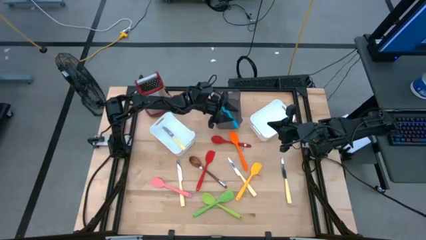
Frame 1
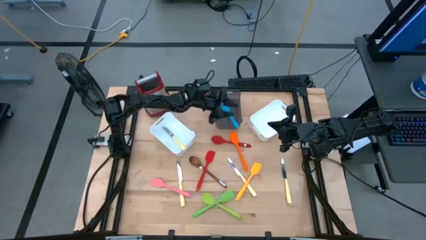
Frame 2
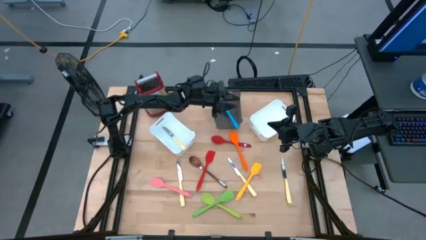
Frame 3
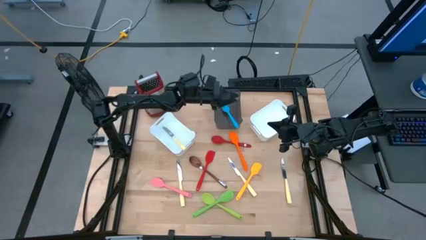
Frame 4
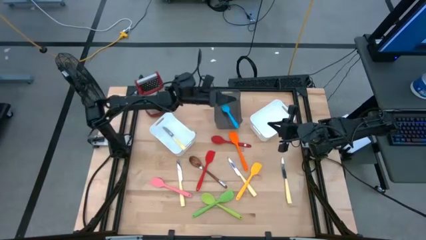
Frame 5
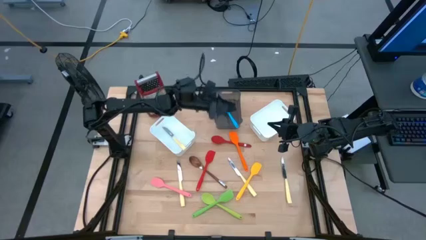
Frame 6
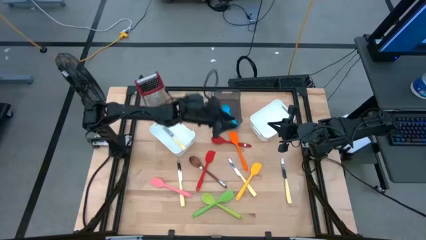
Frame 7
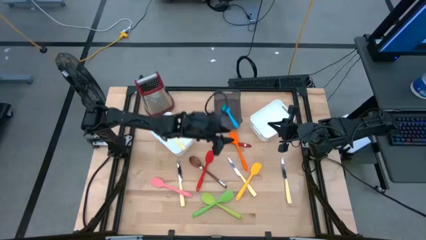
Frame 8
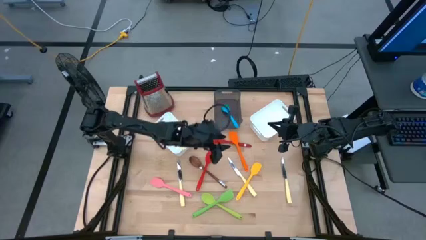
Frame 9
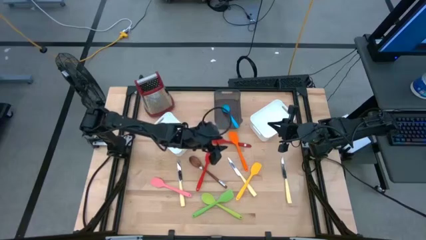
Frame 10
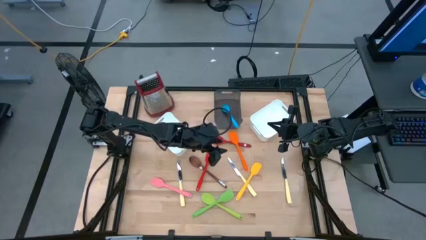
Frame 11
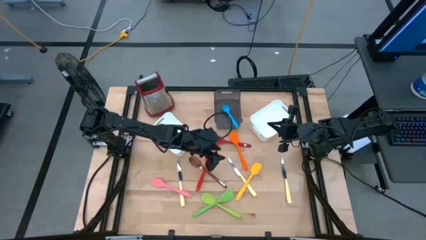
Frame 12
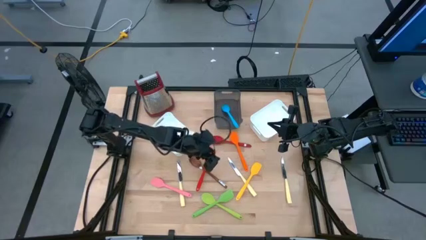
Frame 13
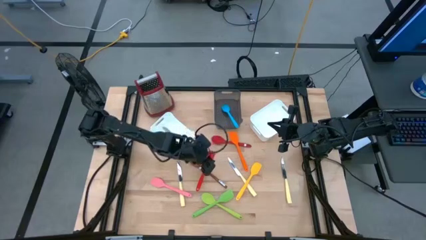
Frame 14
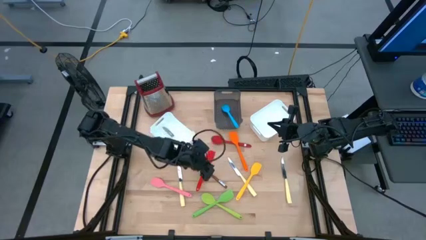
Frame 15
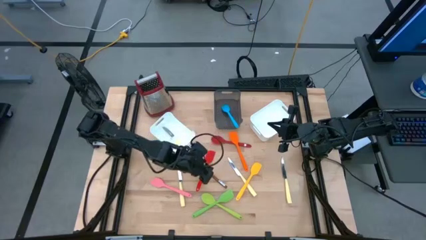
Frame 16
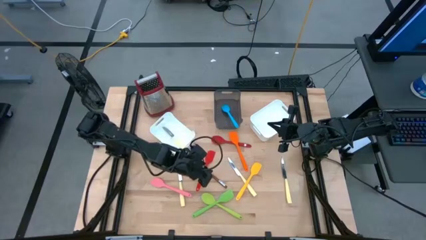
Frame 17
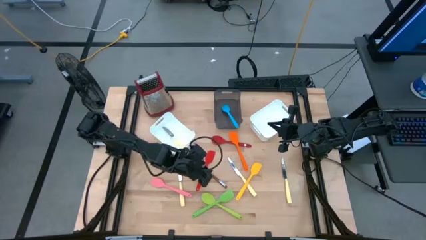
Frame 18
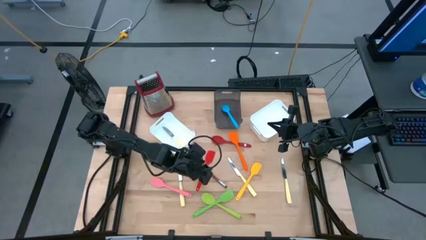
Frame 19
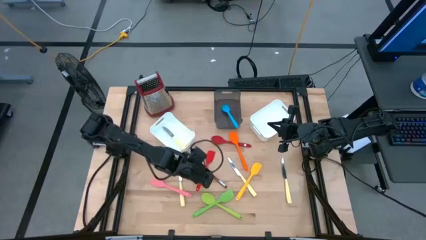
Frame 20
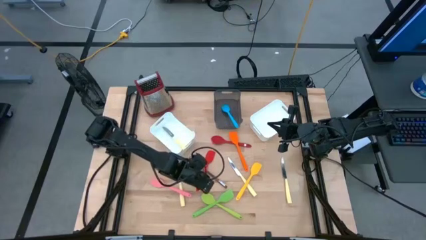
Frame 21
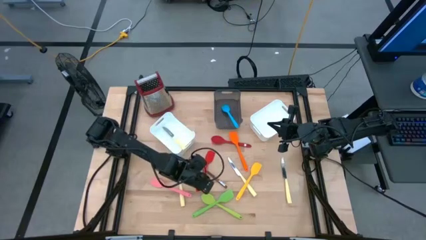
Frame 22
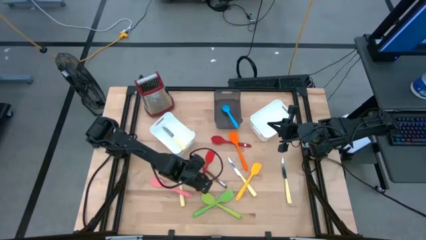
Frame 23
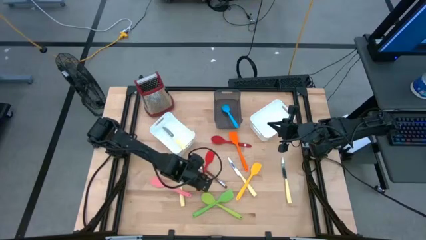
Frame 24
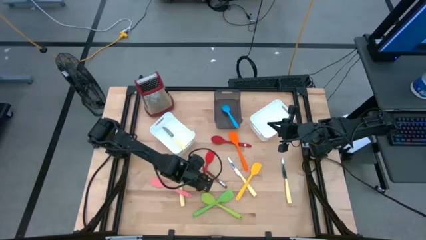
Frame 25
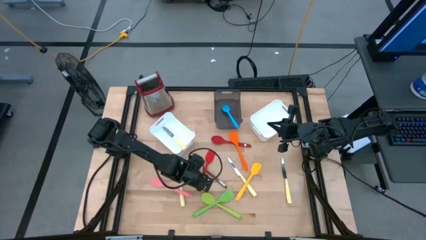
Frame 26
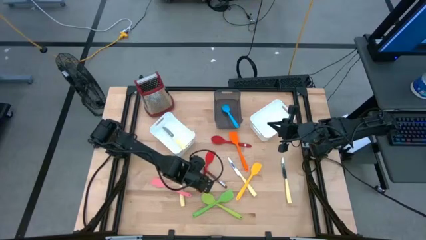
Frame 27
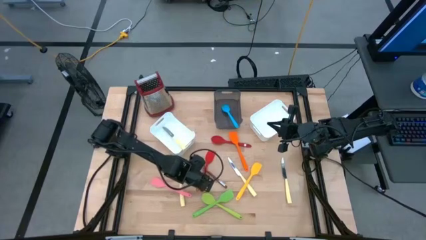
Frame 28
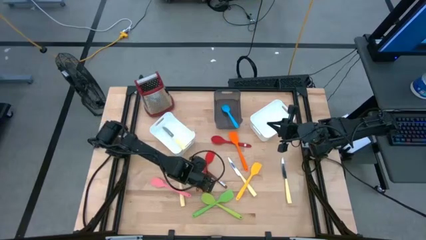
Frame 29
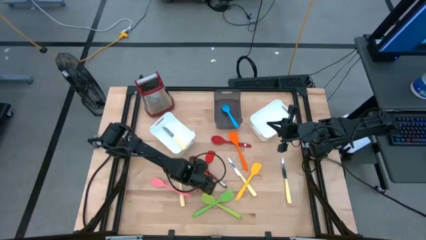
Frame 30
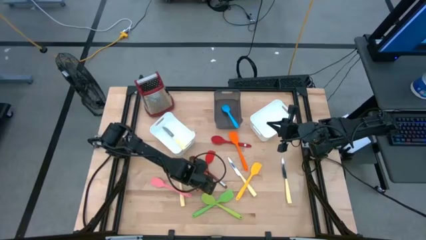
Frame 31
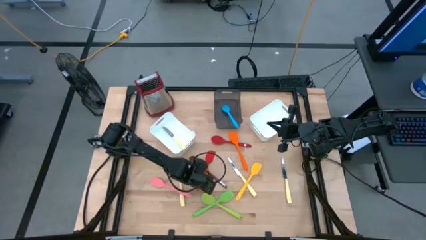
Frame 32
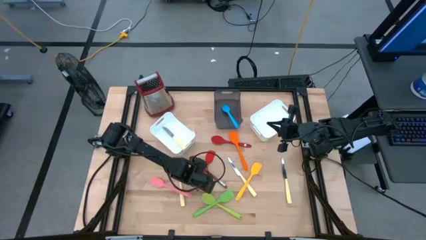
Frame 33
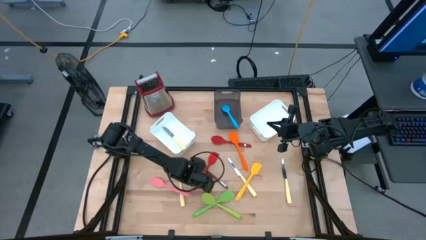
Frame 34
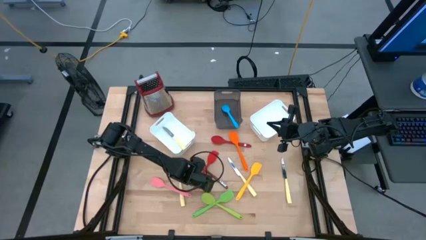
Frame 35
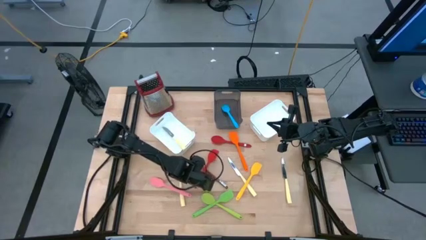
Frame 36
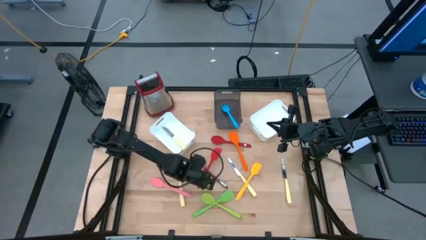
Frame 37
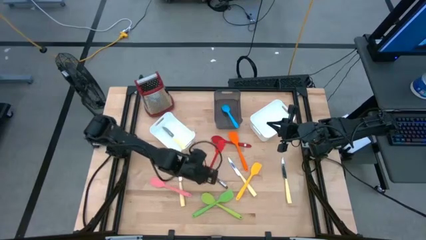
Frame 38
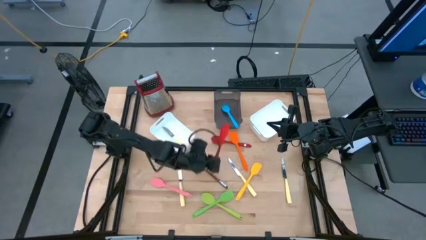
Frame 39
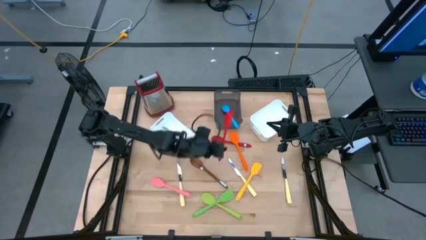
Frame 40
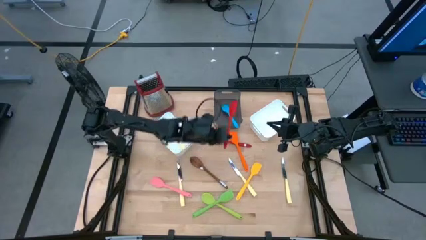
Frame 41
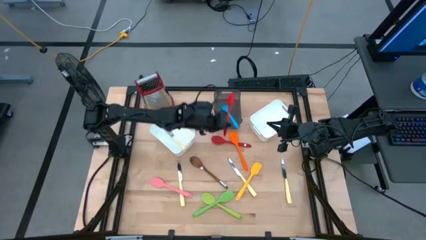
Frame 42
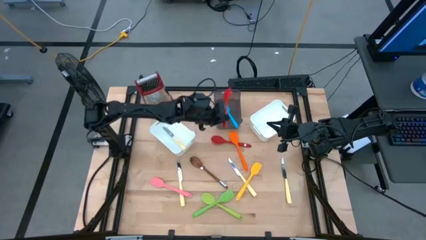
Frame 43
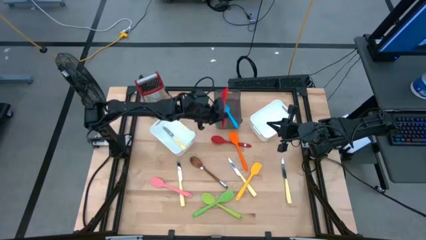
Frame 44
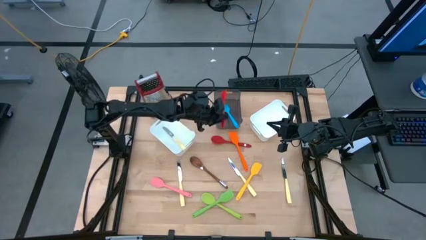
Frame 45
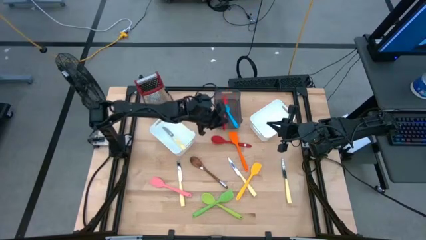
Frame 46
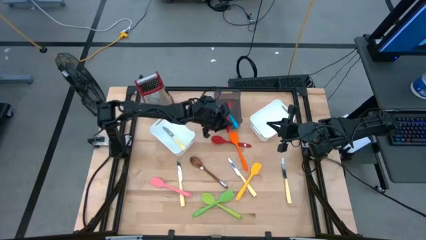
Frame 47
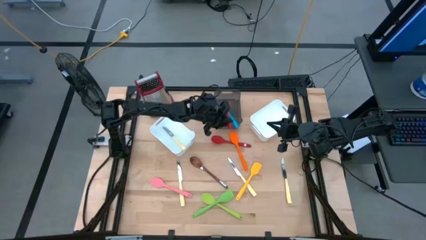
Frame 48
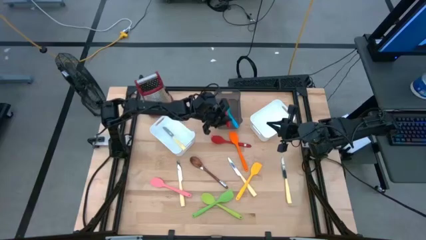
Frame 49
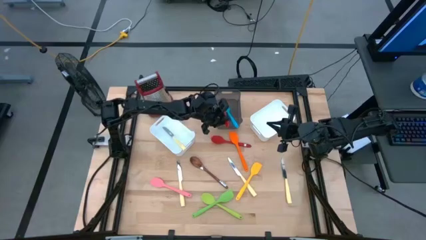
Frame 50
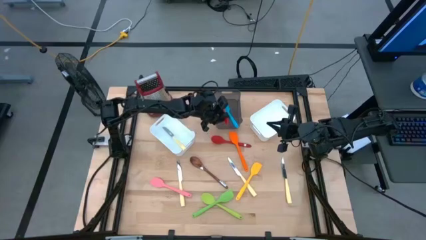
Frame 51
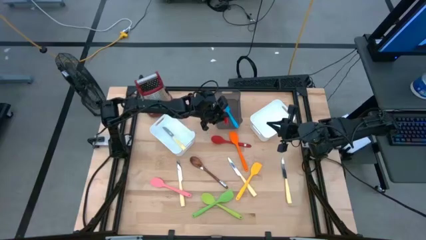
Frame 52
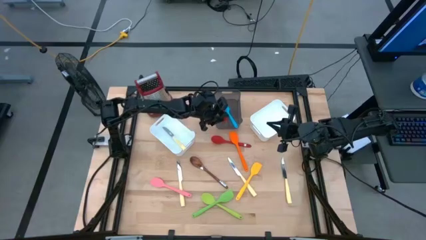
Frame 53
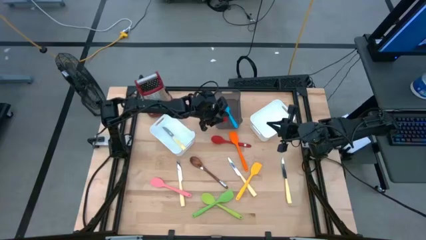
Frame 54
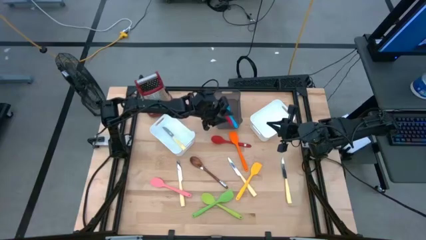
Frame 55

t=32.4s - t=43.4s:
Task: Pick & Place Kitchen Items
Put the red spatula into the black bin
